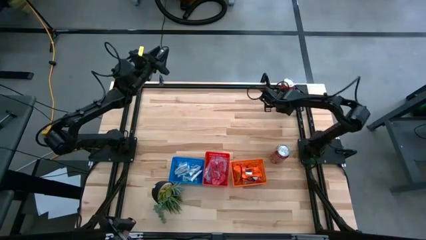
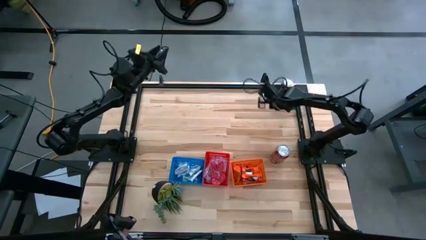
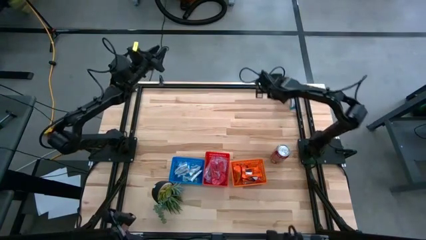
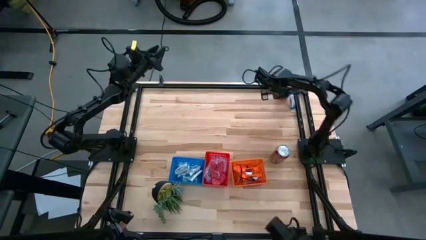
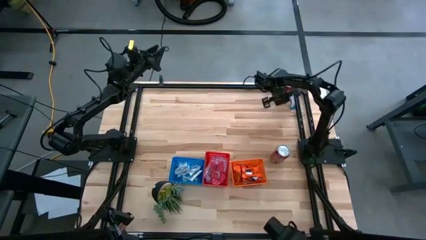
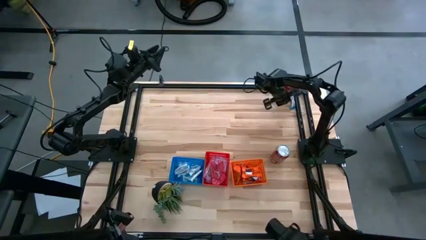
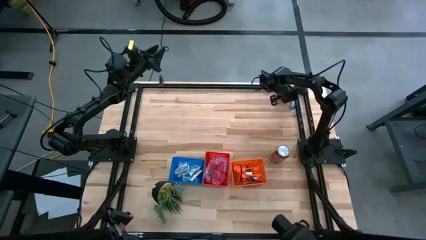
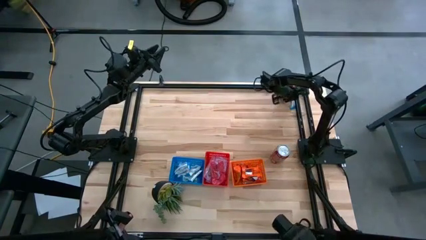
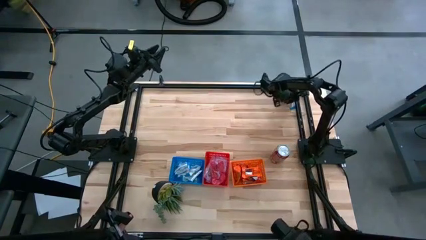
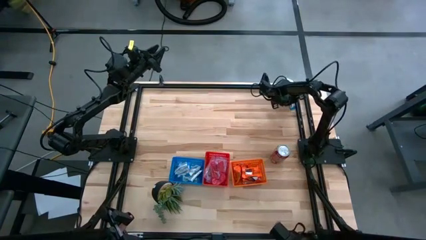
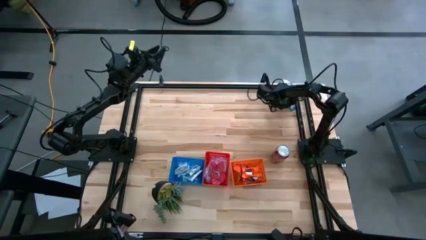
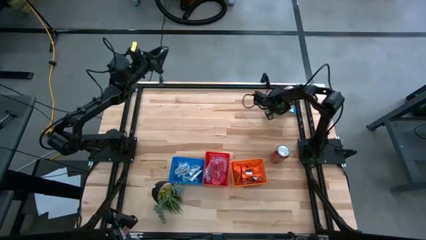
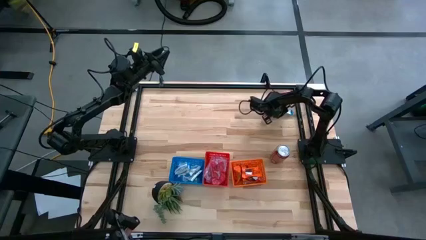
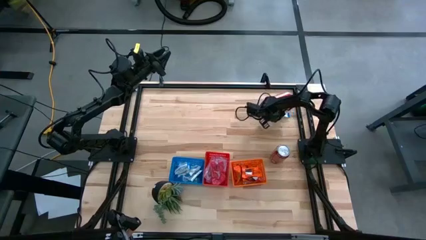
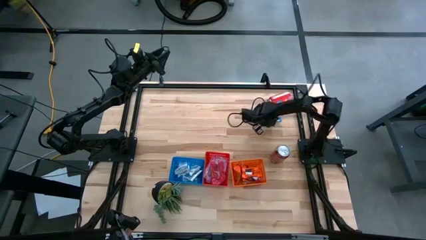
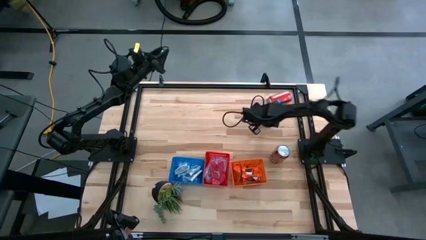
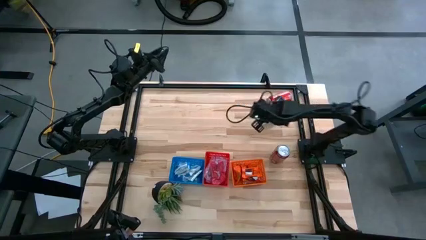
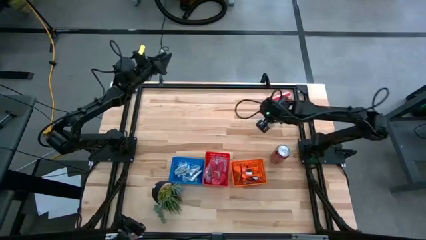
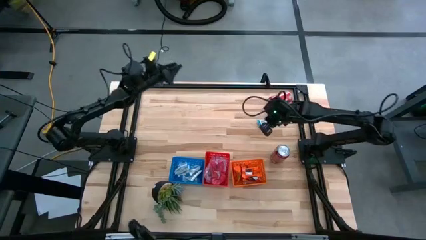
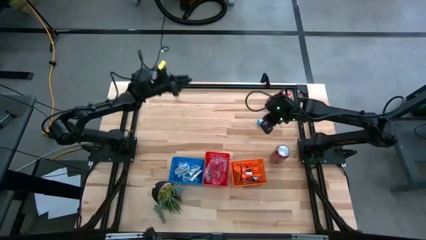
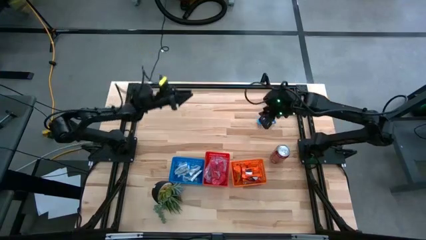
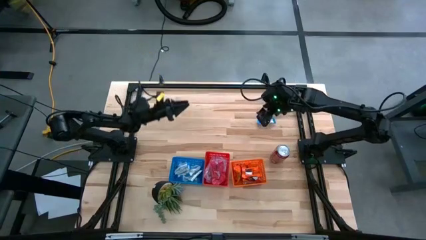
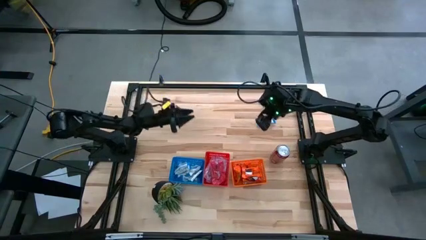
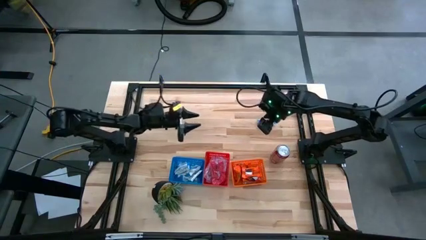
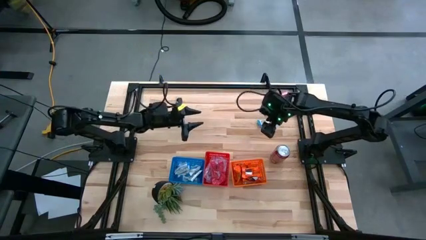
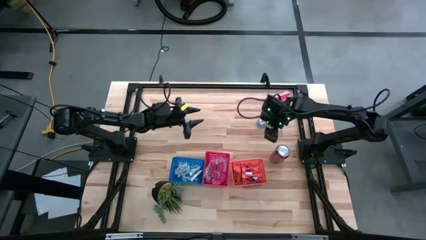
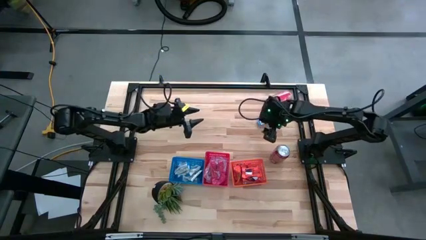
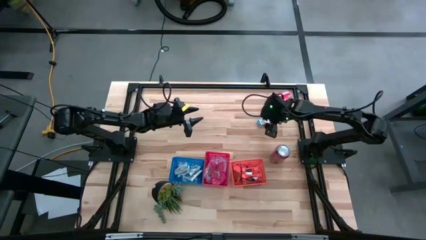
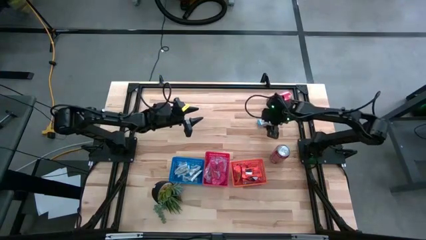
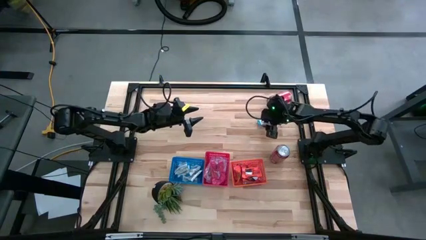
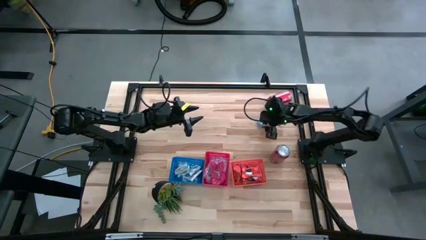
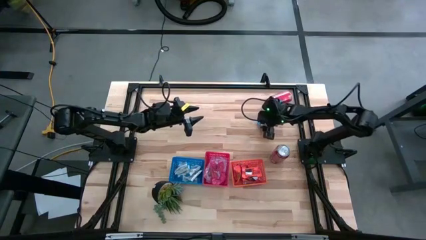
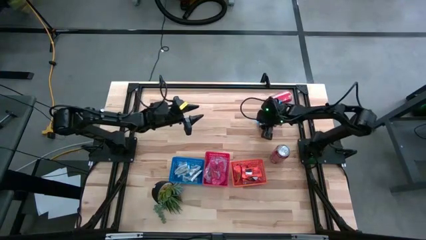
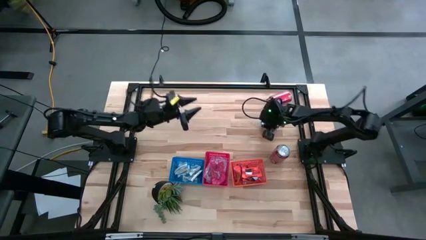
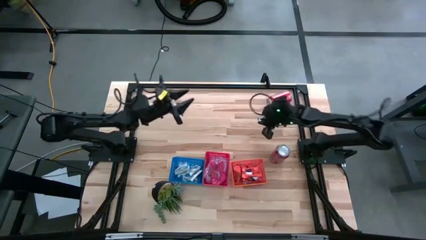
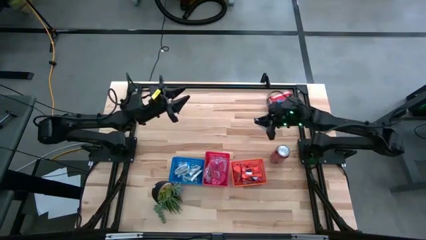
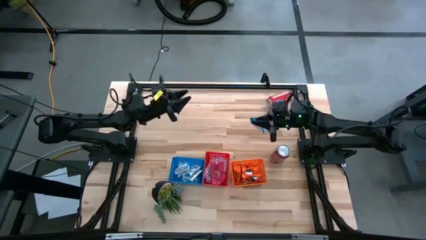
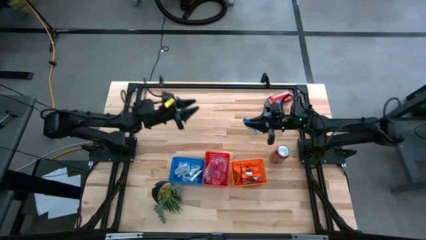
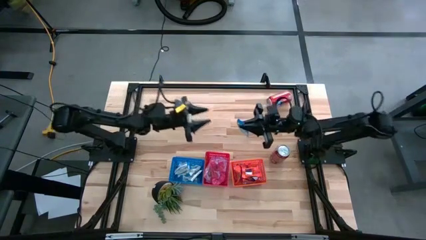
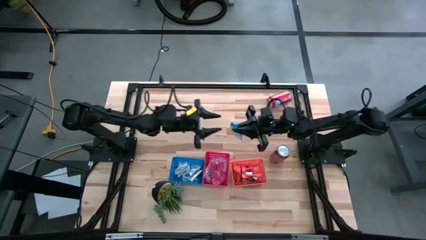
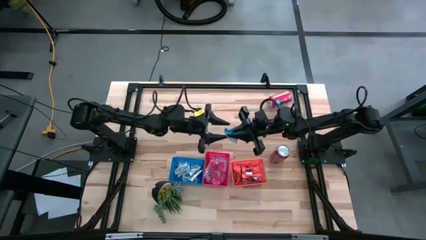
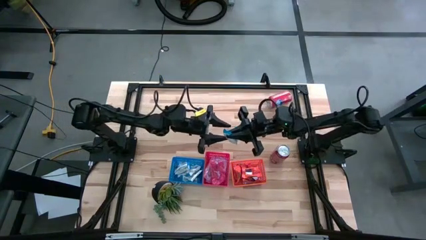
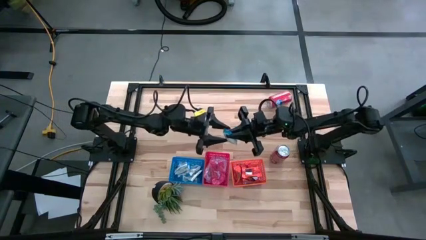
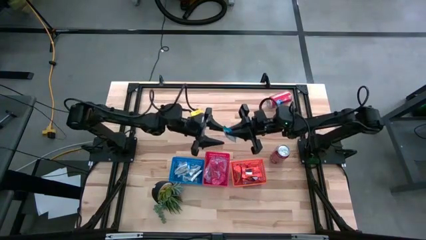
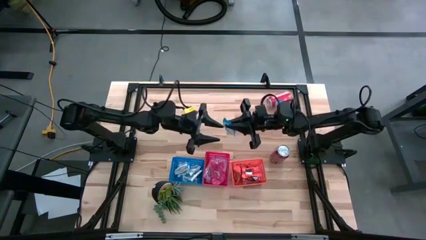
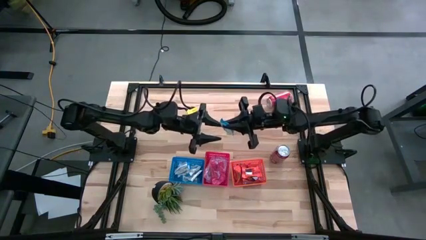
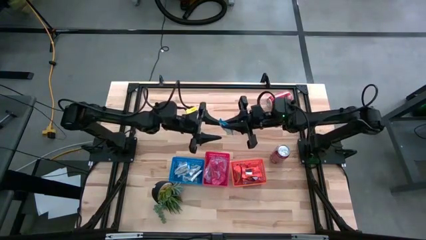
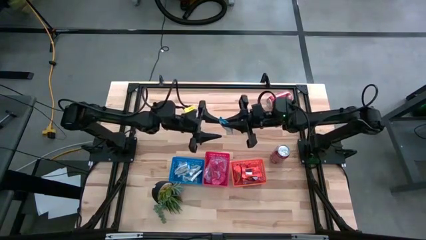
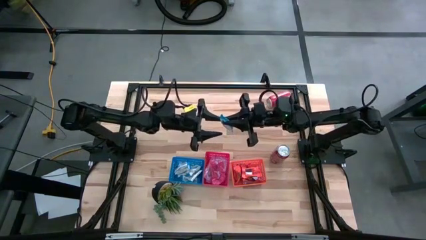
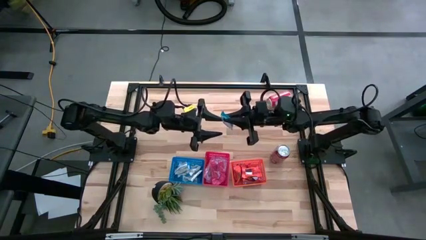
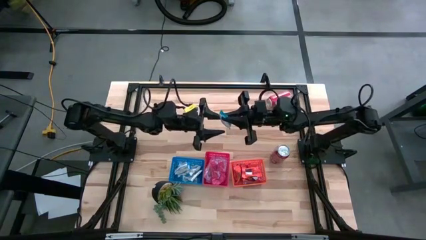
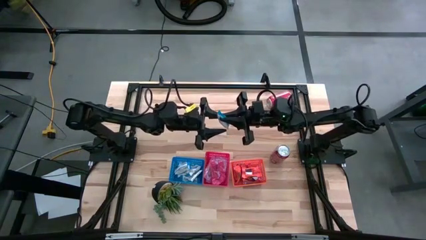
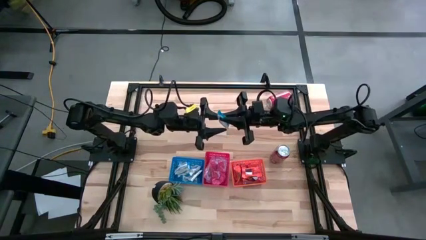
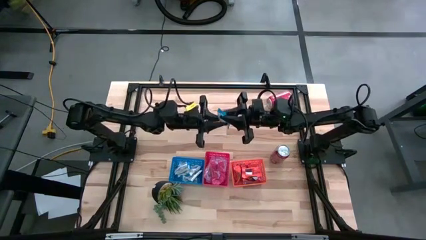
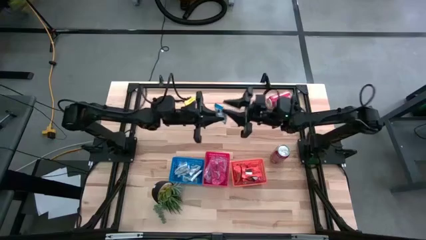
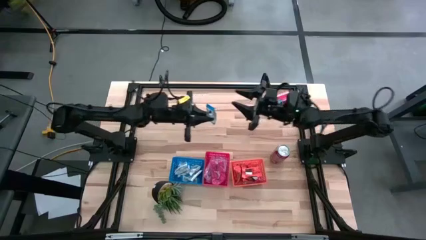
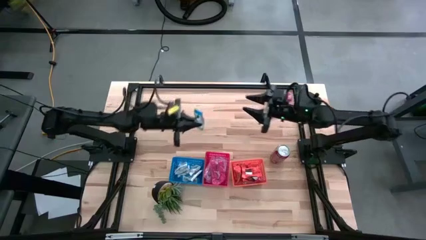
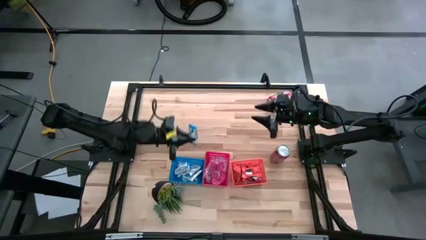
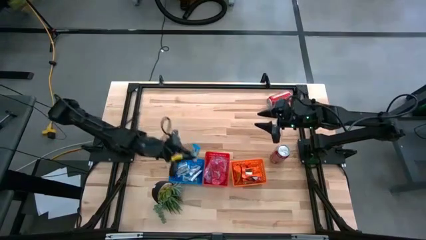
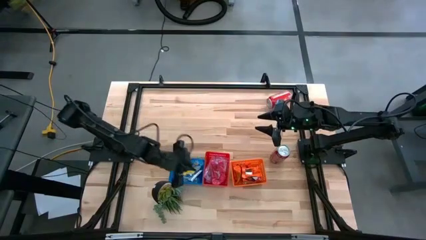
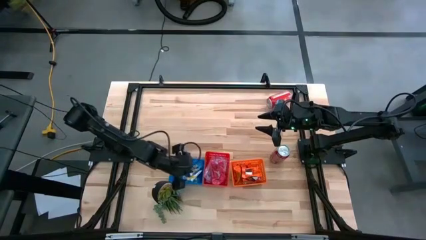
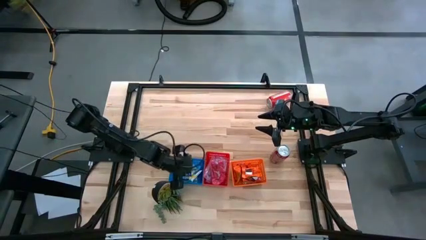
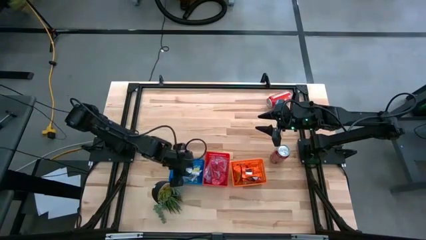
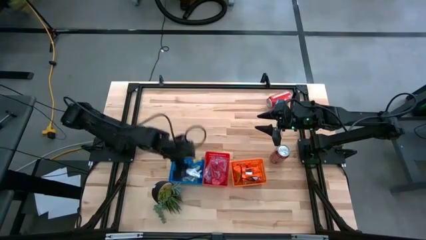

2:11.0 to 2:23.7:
Task: Sort candy
Put the white candy pack into the blue bin

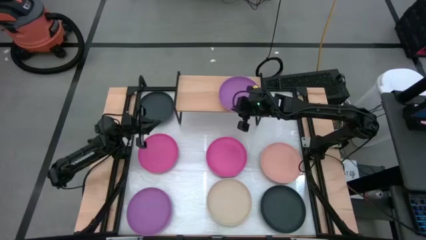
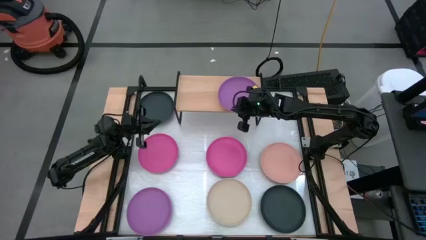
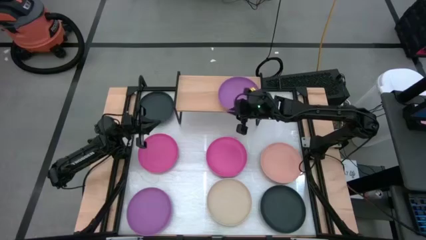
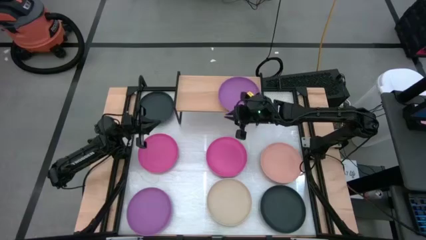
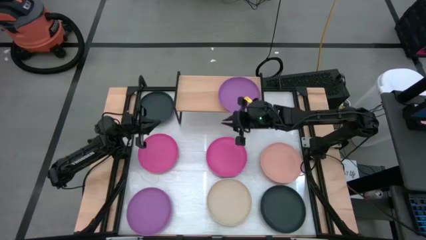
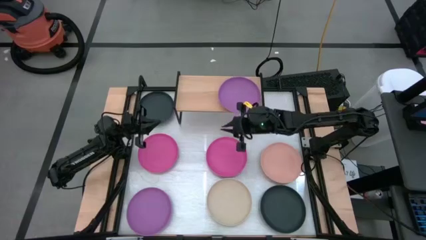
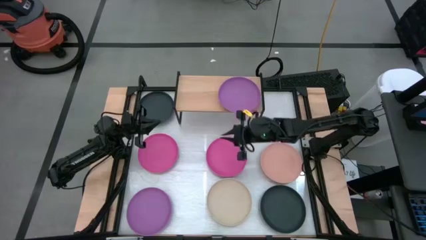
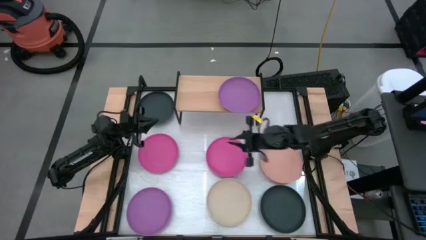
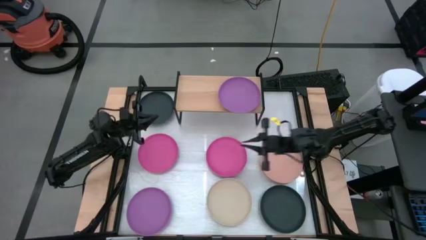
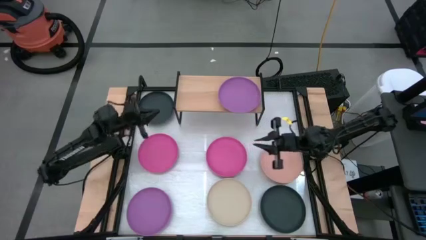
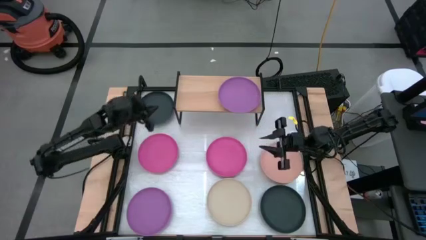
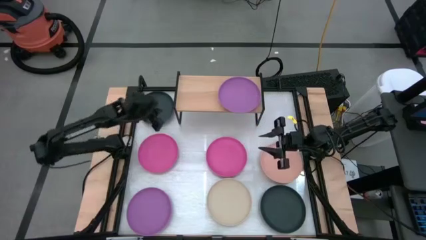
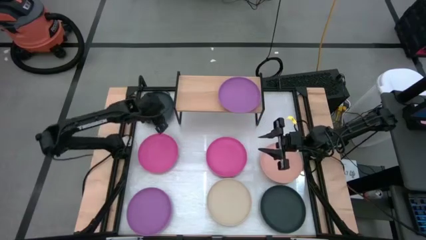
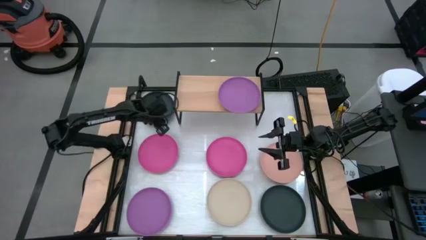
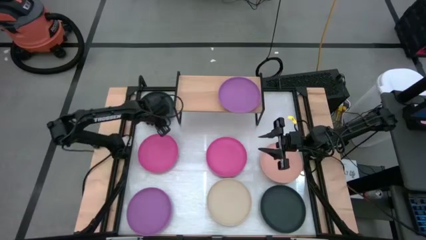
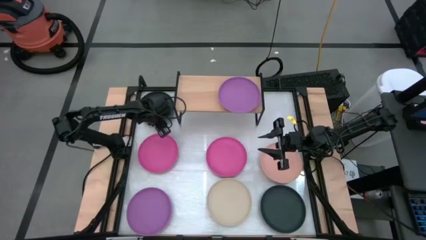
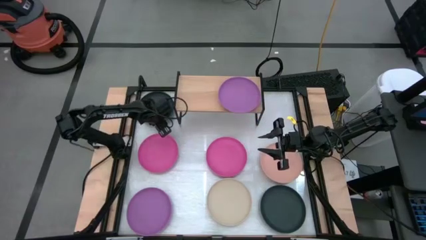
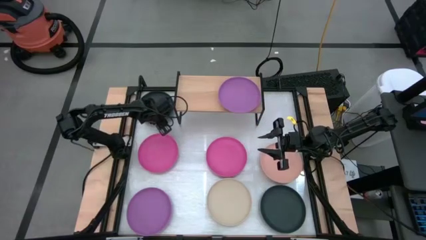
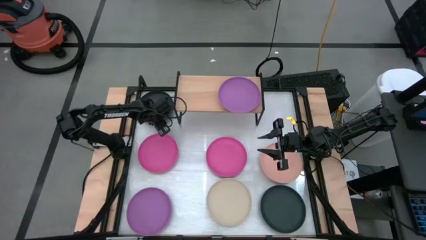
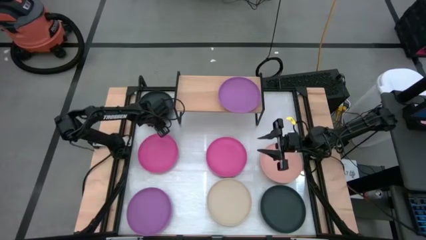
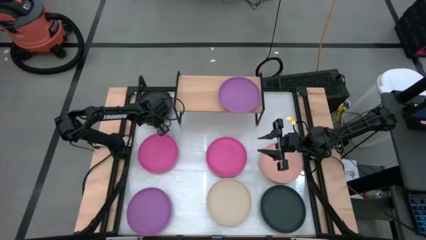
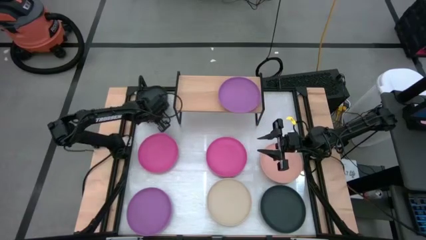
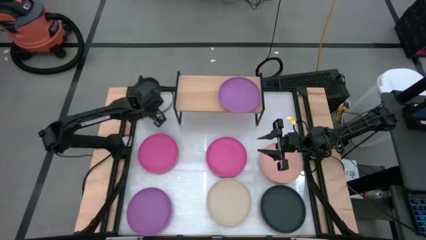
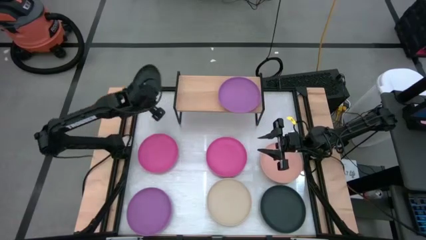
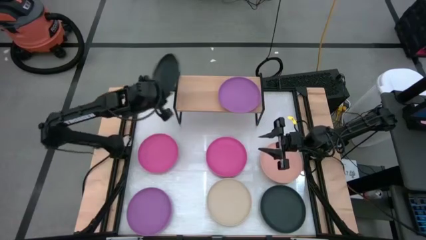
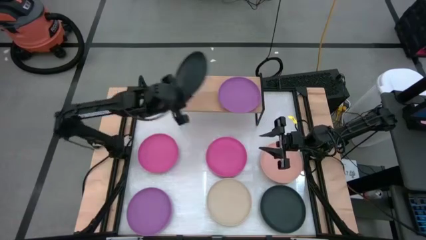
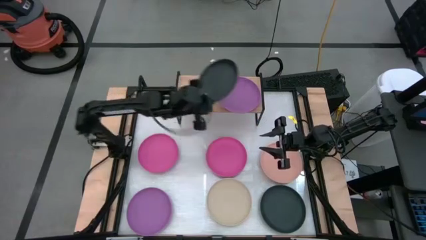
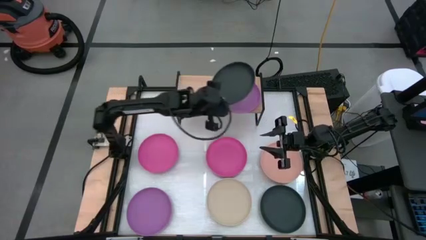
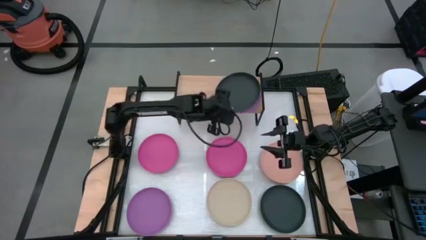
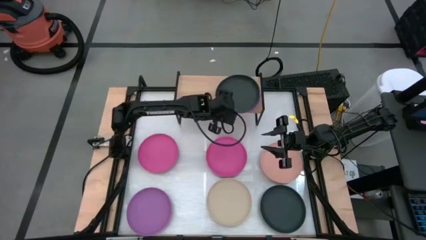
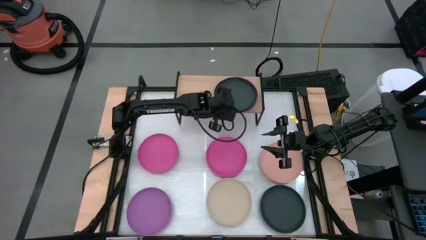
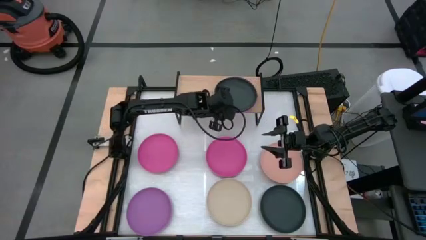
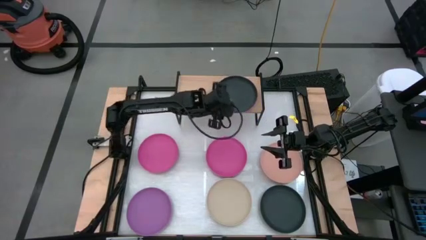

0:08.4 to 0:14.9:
Task: Place and stack plates onto a shelf
Stack the left black plate on top of the purple on the shelf
